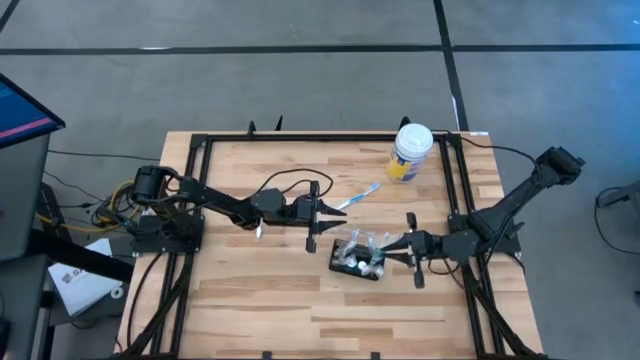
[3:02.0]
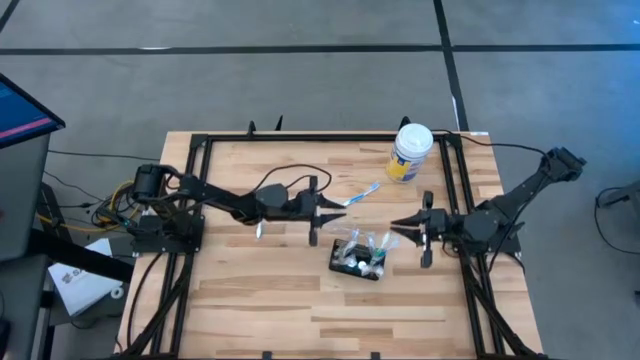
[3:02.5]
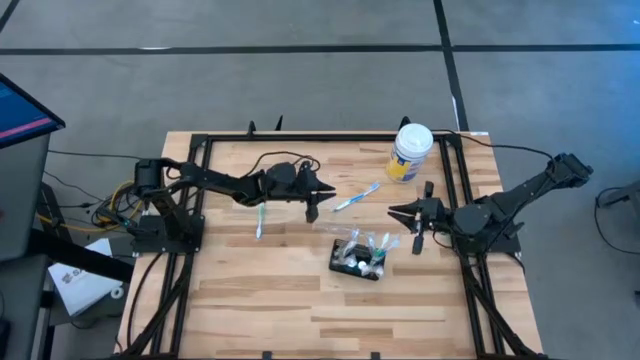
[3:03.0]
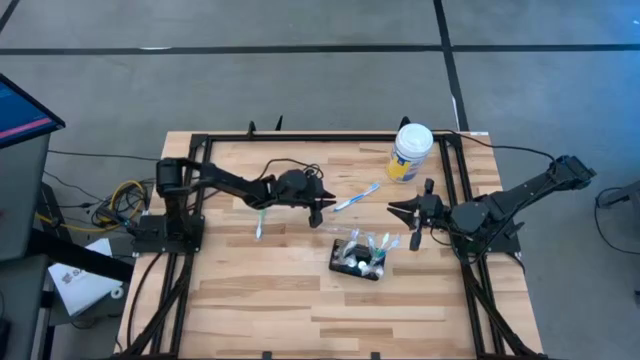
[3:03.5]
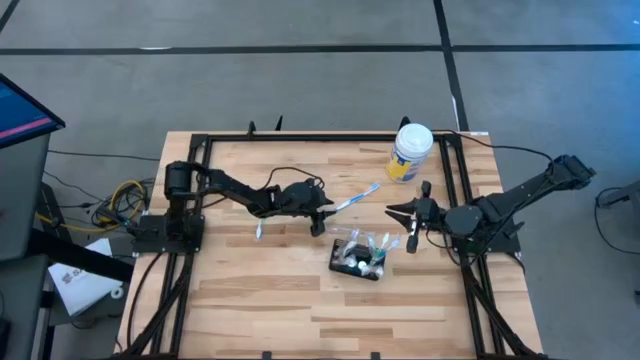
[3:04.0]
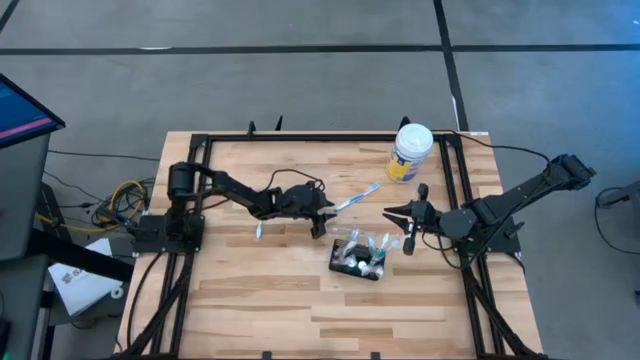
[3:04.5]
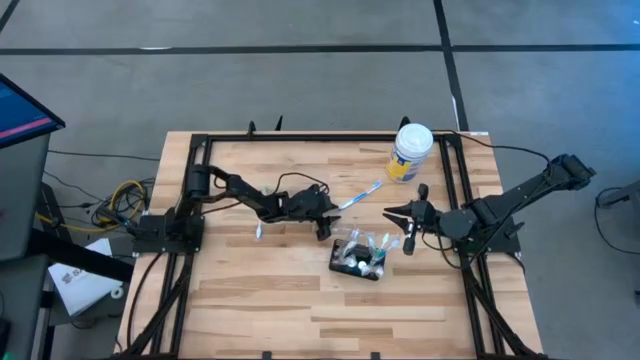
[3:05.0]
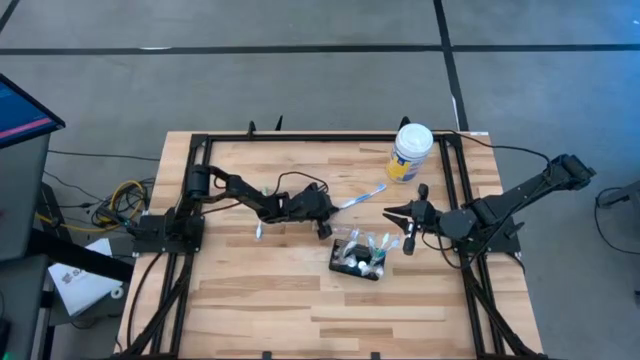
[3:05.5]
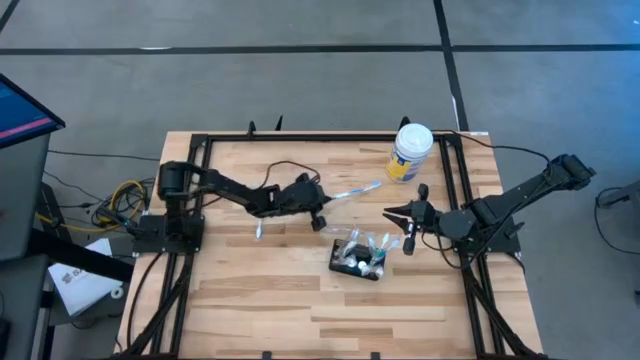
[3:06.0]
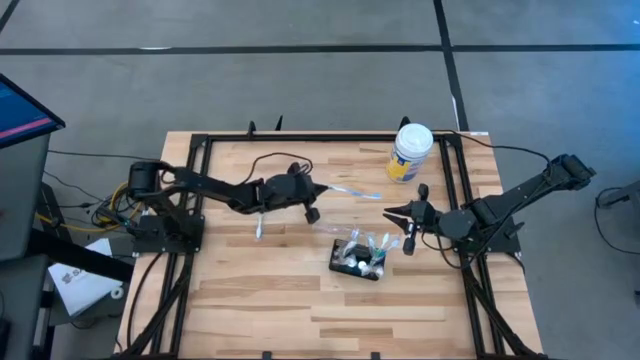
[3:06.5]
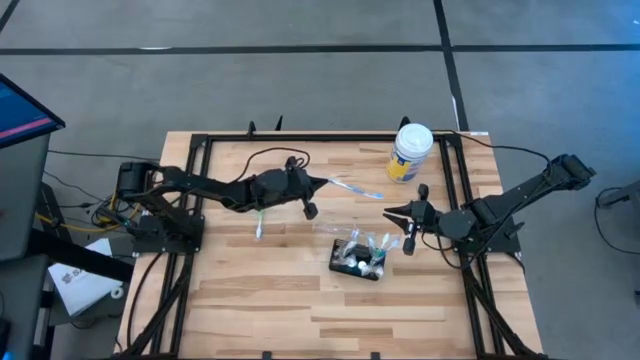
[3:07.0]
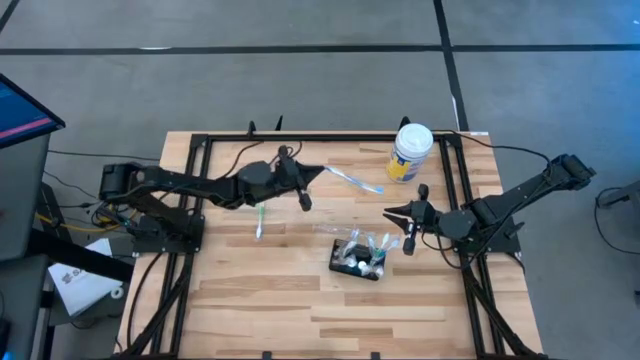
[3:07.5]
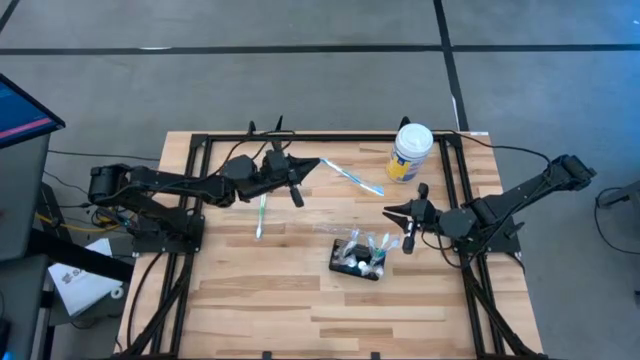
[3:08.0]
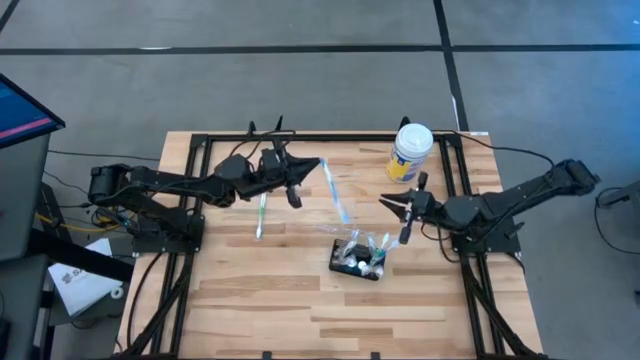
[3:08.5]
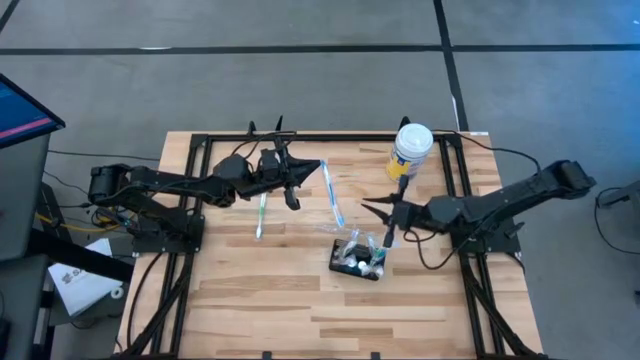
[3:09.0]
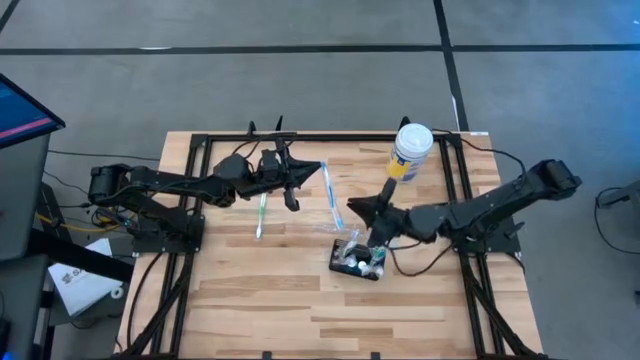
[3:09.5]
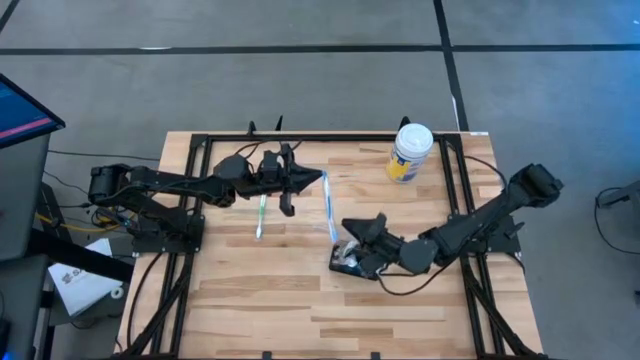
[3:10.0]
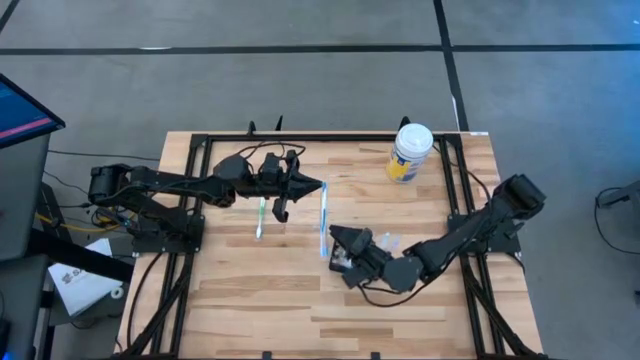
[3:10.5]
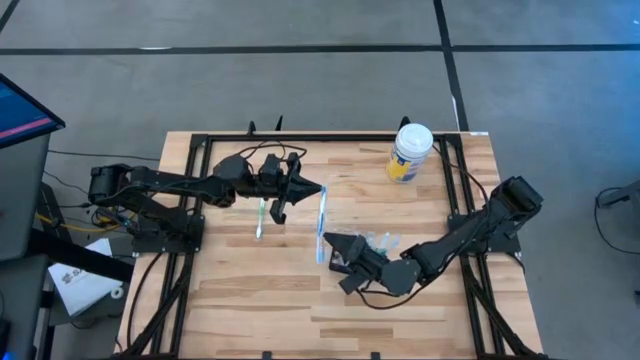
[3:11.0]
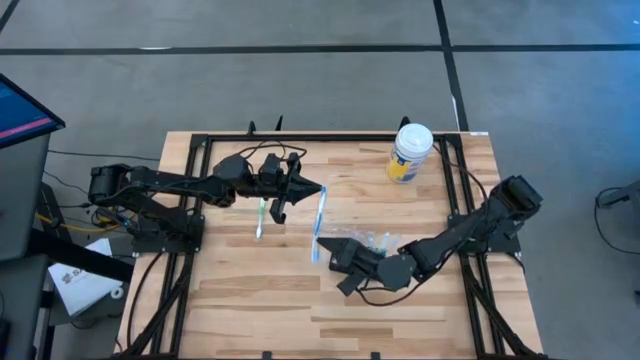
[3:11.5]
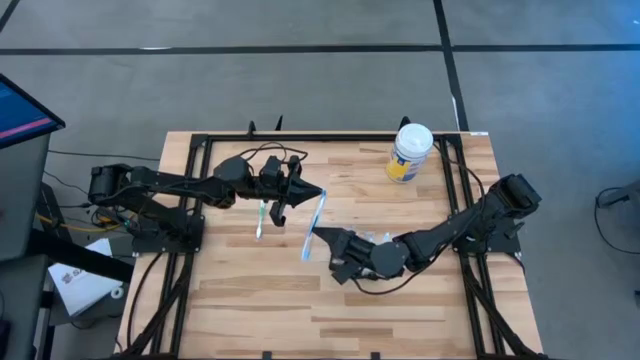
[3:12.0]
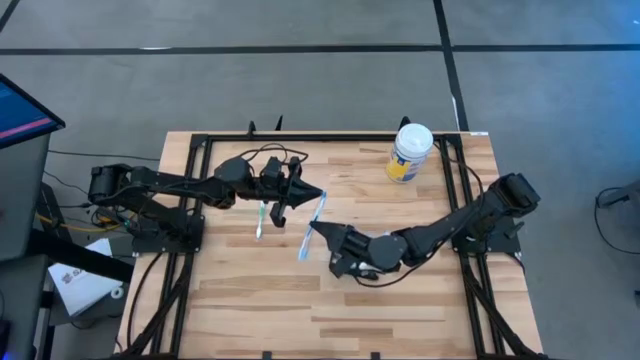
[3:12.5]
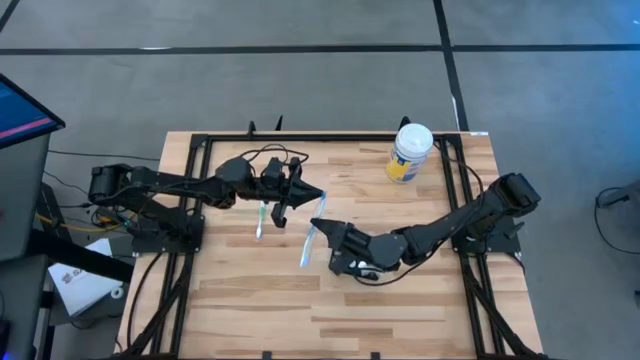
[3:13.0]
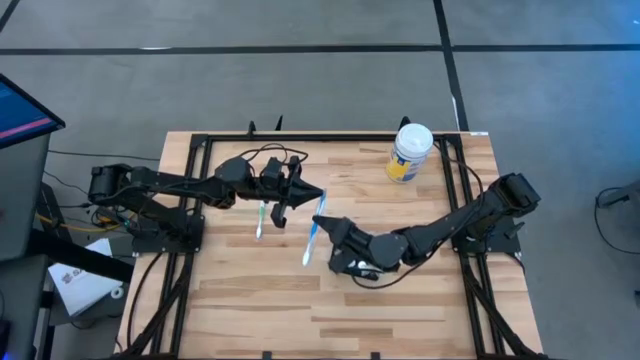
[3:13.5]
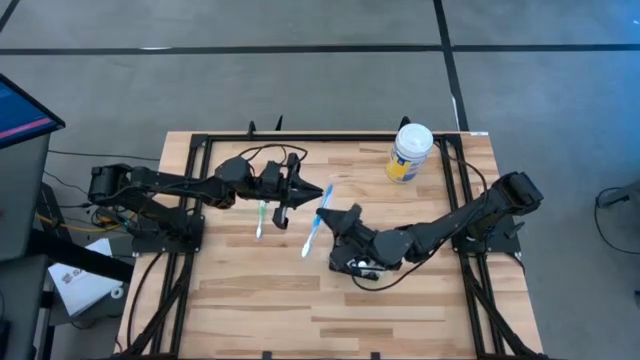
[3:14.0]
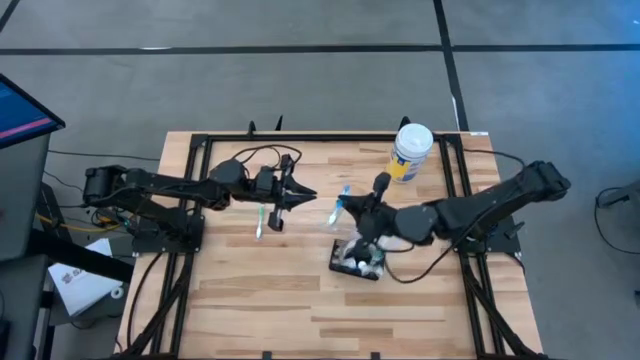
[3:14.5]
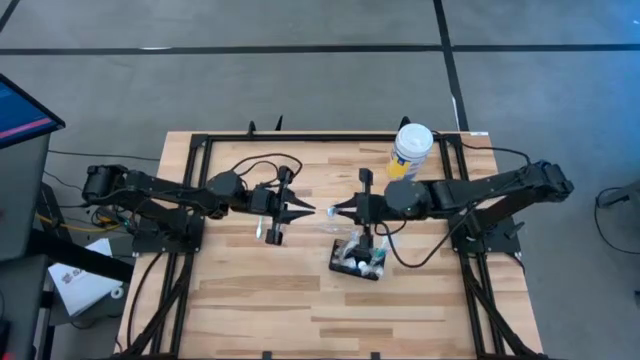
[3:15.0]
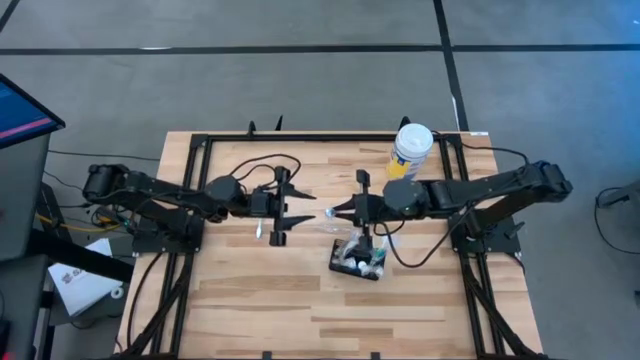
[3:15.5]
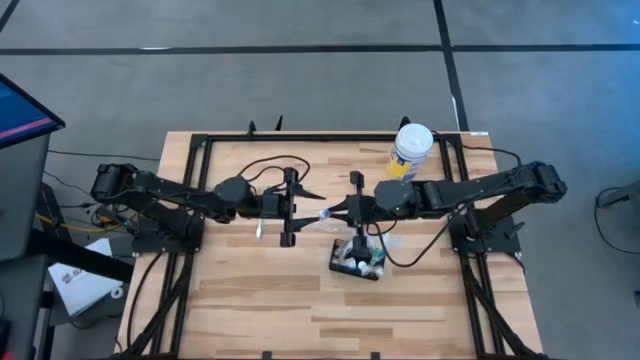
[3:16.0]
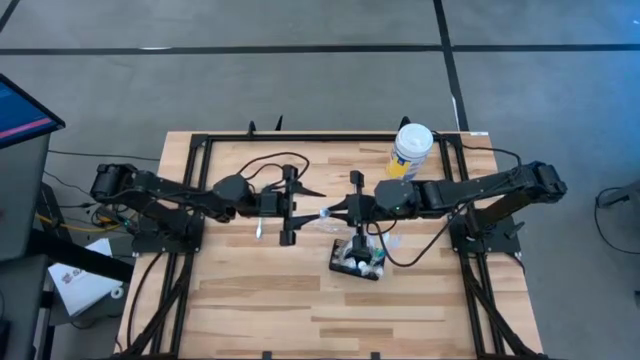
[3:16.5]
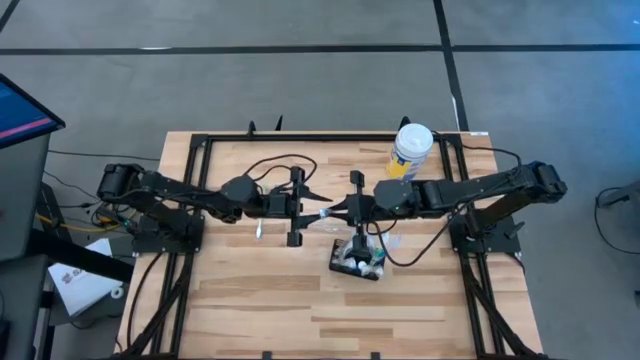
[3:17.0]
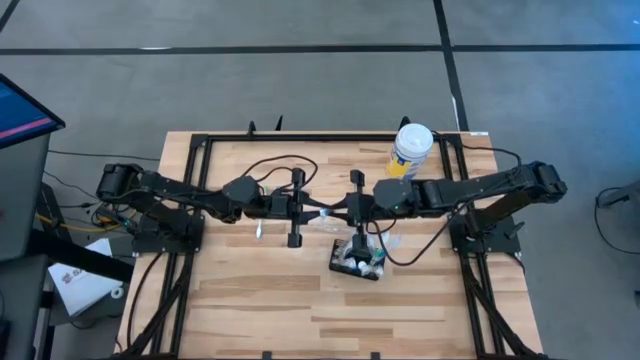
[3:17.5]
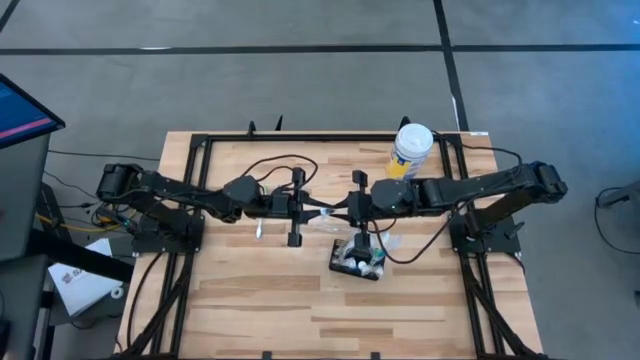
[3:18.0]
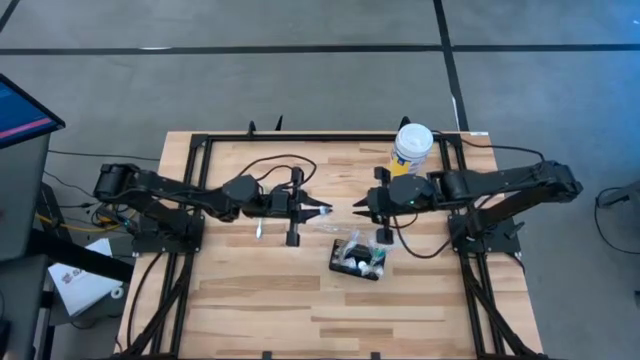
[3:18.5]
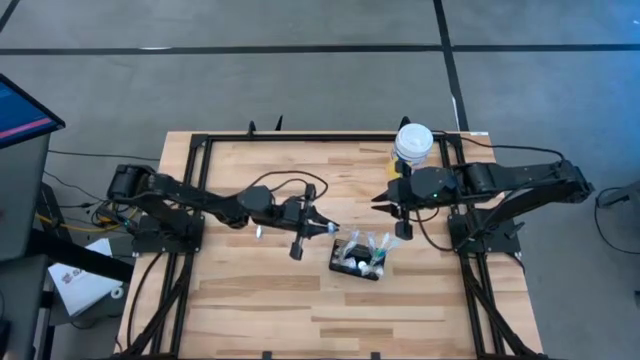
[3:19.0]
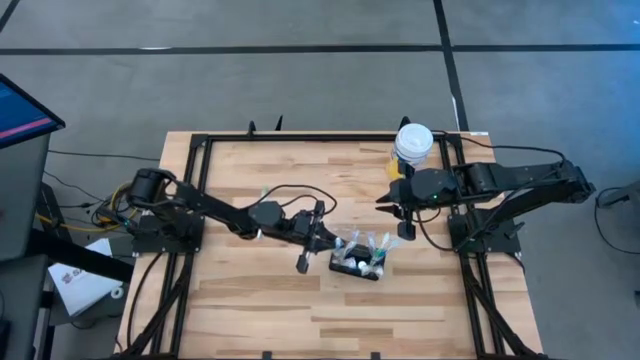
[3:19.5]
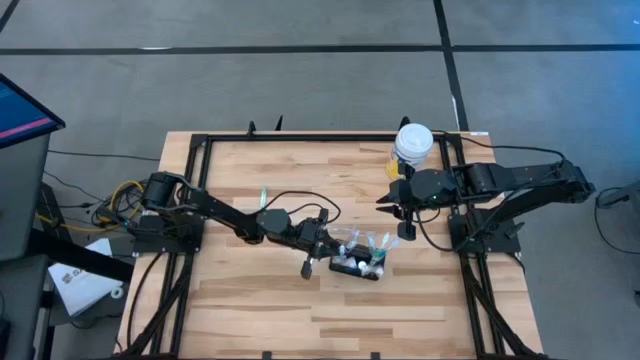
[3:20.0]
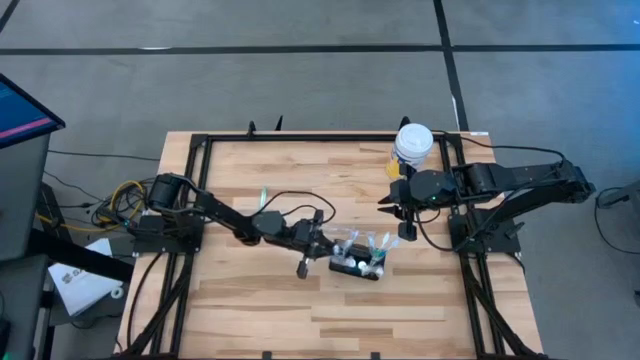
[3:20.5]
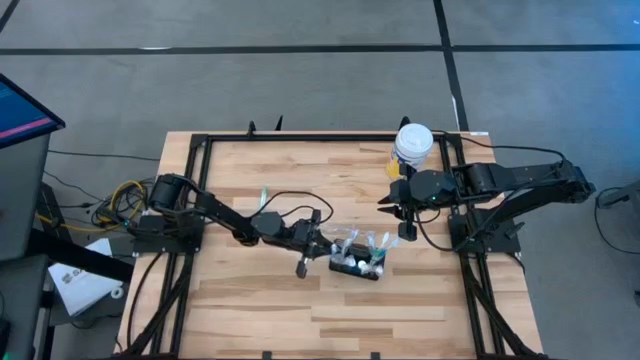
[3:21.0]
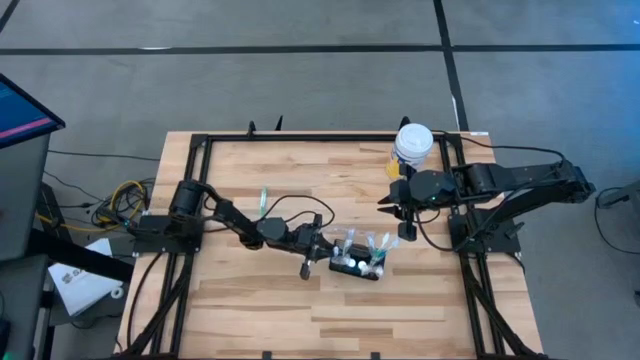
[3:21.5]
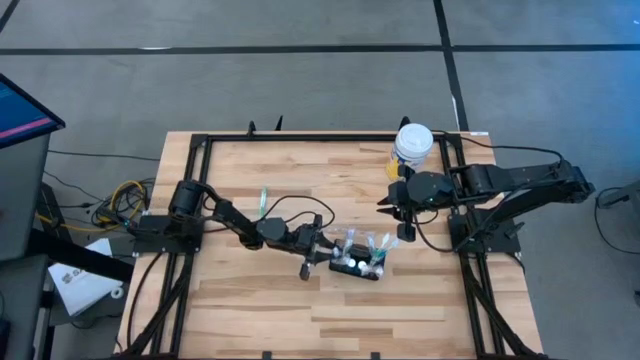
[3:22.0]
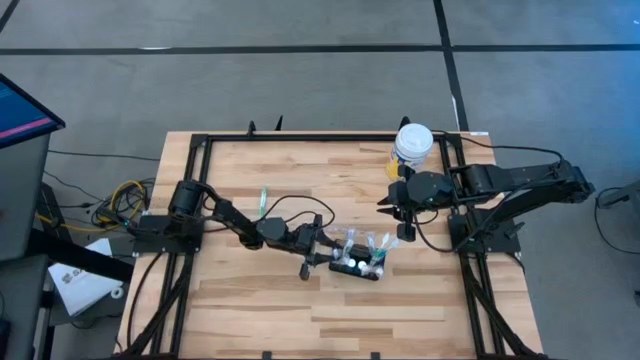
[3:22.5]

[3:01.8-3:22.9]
Task: Pick & Place toothbrushing station
Put the blue toothbrush into the mesh organizer

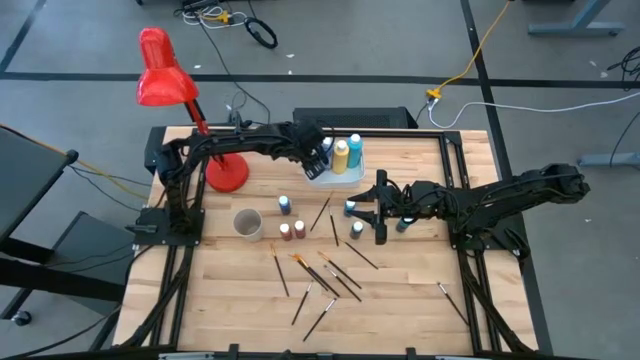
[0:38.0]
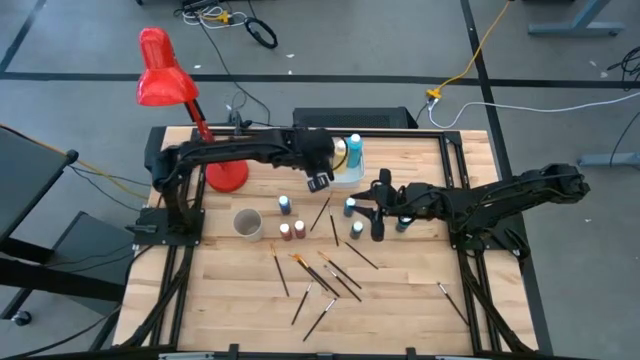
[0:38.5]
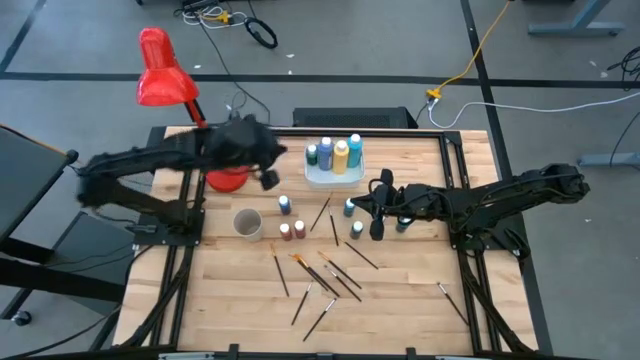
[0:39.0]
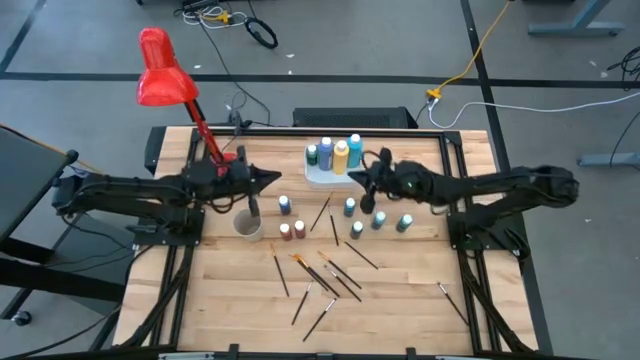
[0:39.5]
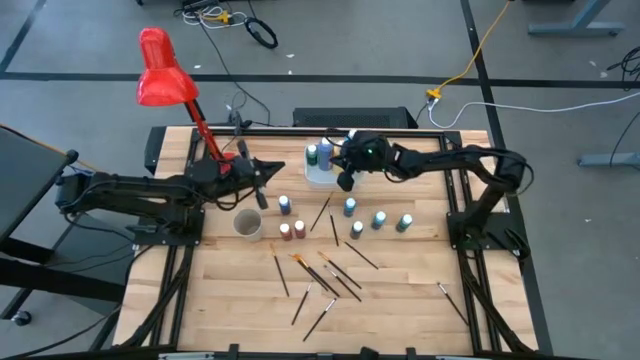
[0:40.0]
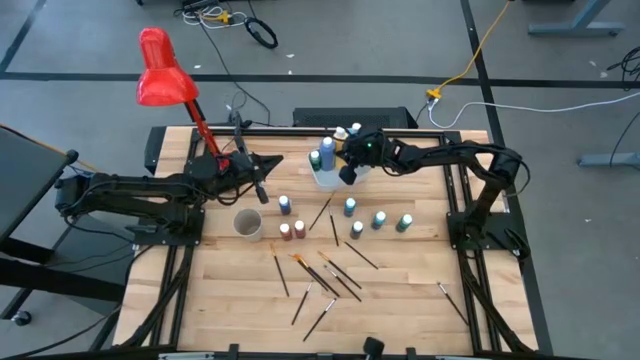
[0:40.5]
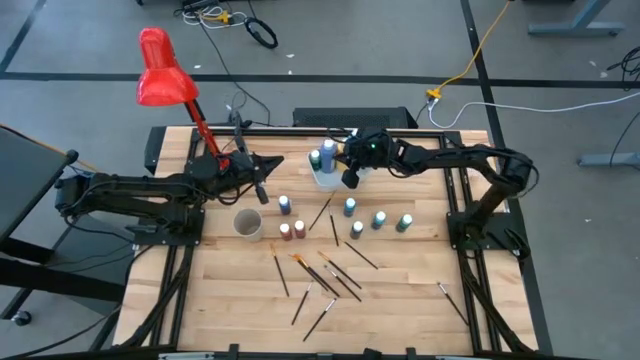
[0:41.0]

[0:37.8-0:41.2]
Task: Pick & Place Paint Supplies
Adjust the paint bottles in the white bin
